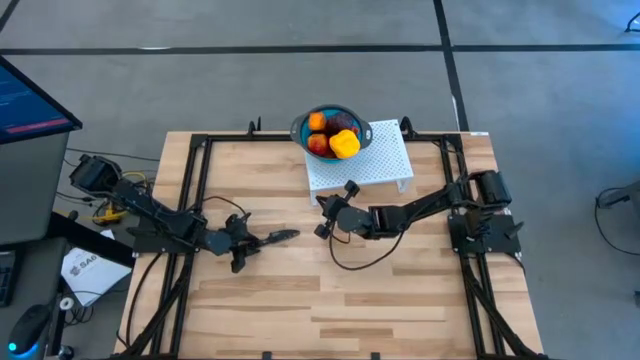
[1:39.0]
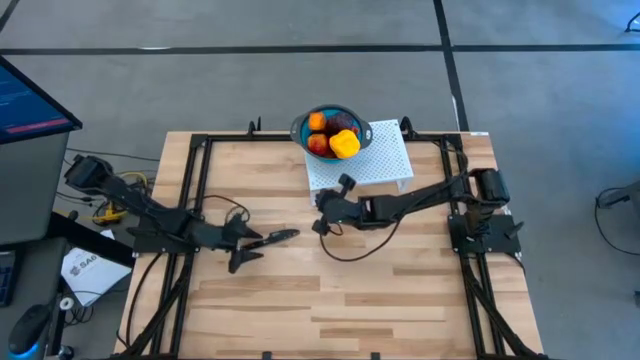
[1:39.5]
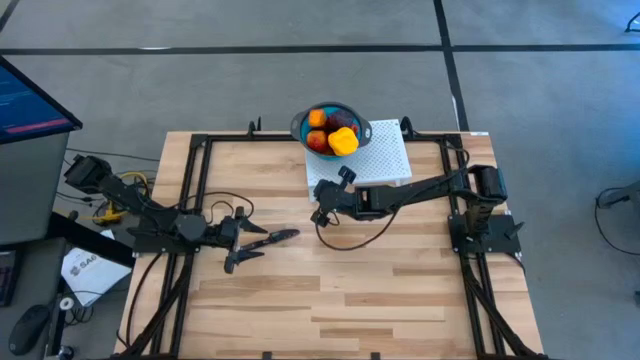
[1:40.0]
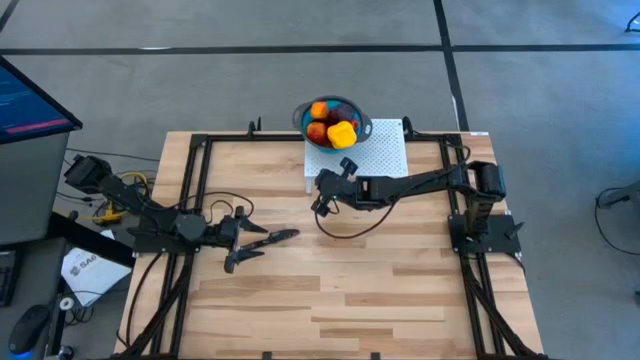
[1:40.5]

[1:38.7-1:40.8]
Task: Pick & Place Fruit
Adjust the shelf

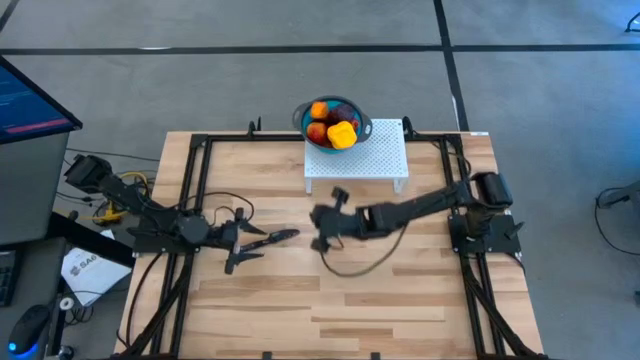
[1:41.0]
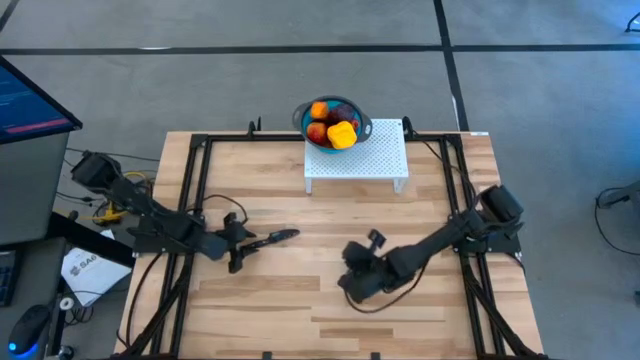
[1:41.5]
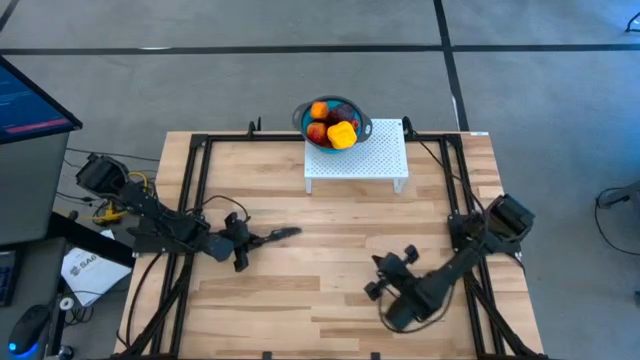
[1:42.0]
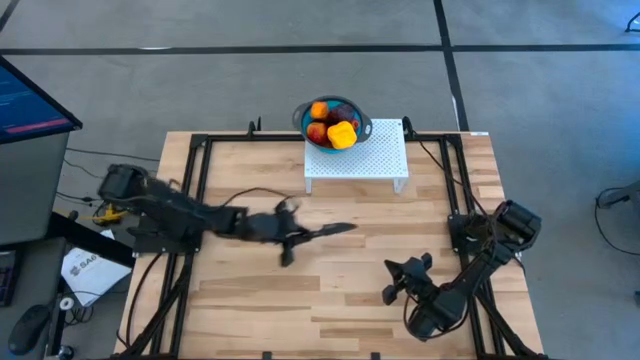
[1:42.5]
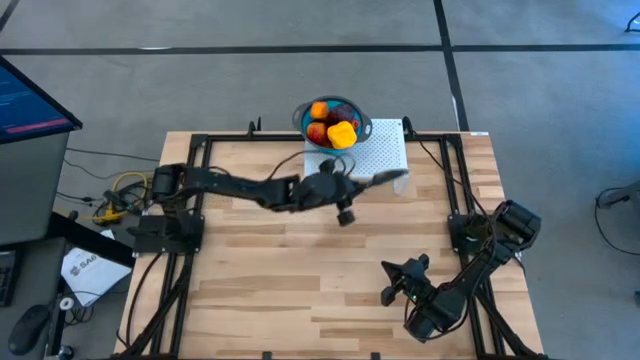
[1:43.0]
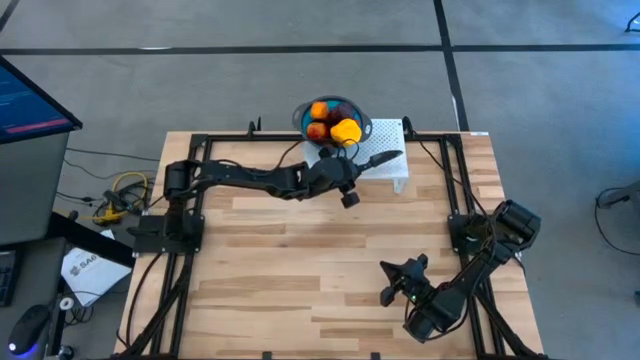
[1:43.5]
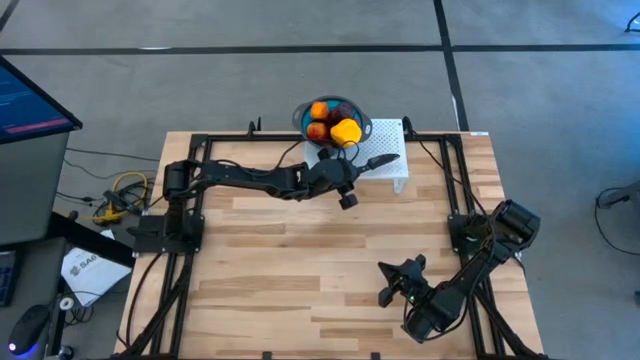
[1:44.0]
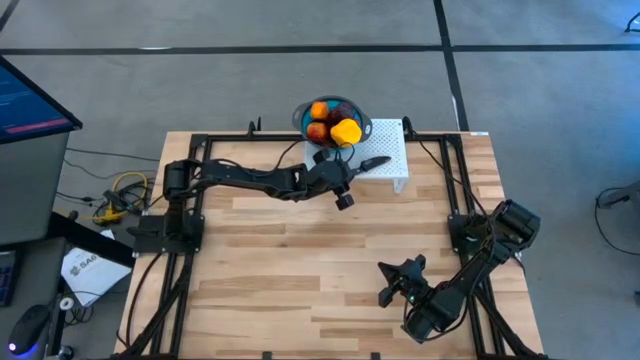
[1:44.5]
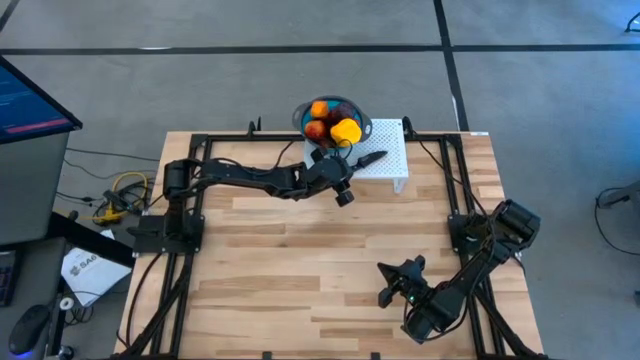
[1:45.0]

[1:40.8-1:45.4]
Put the black knife on the shelf

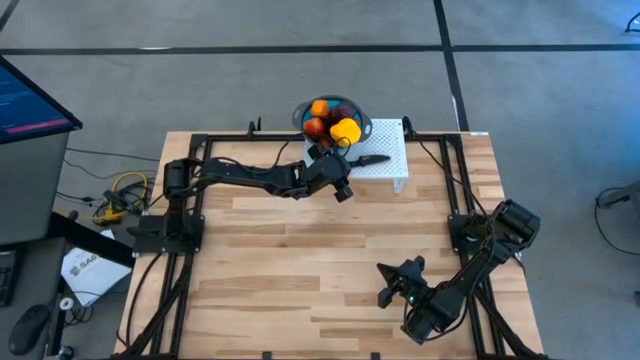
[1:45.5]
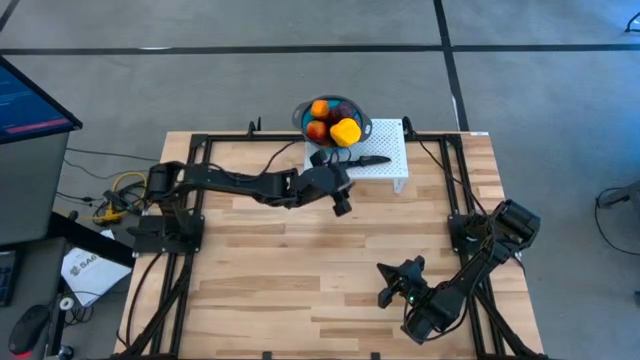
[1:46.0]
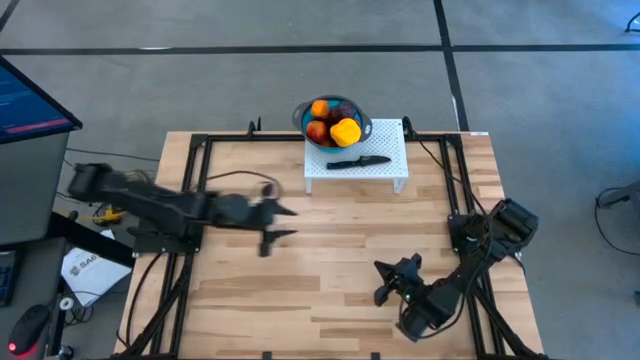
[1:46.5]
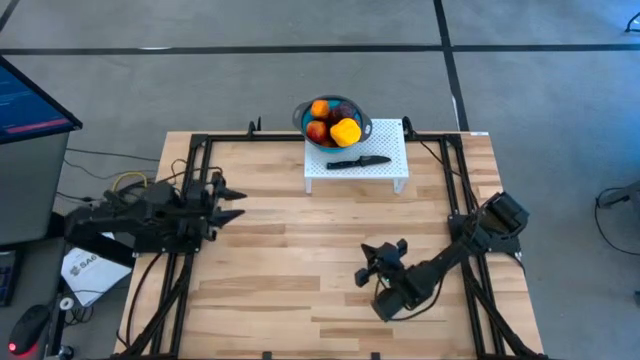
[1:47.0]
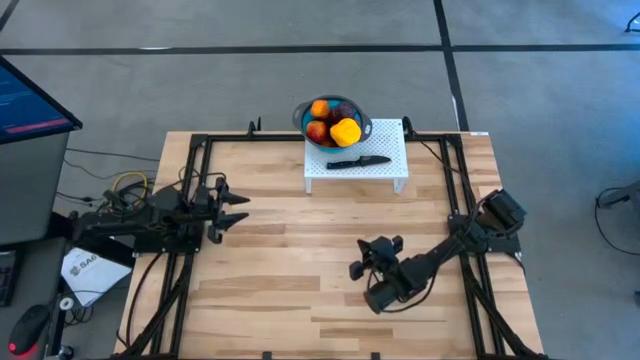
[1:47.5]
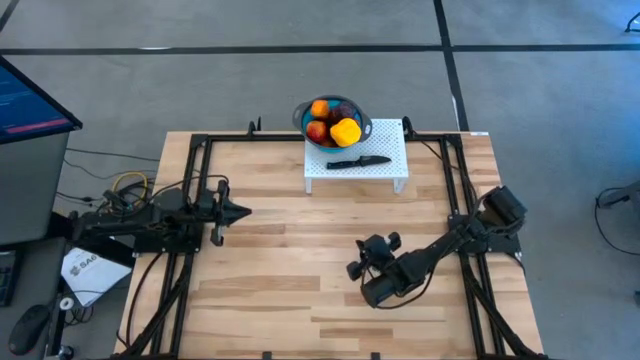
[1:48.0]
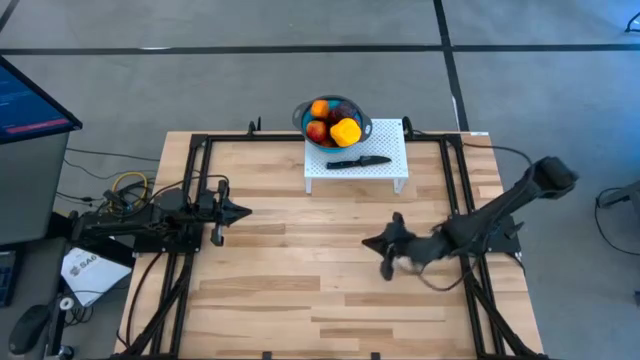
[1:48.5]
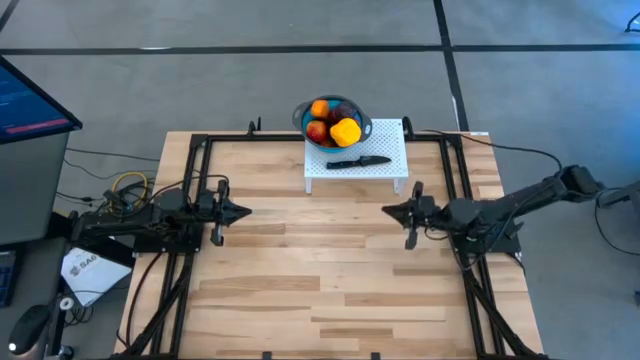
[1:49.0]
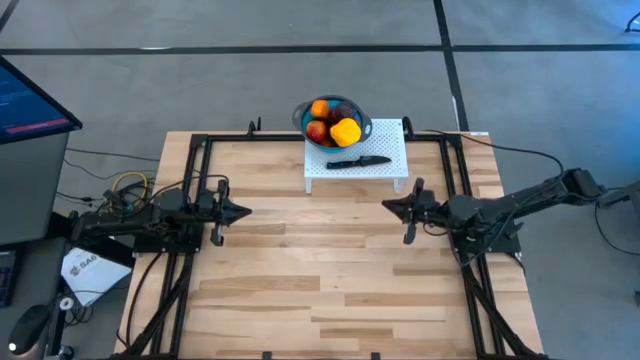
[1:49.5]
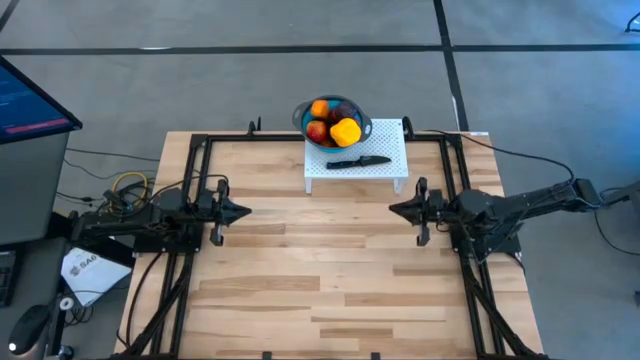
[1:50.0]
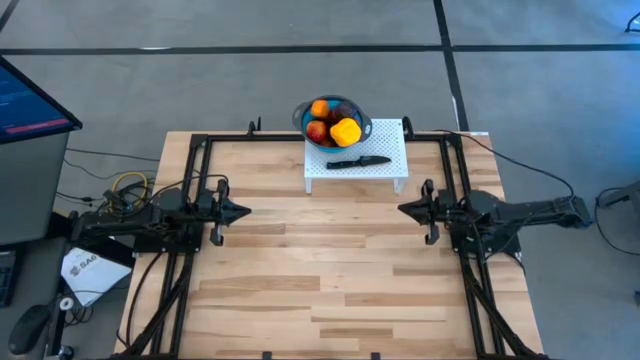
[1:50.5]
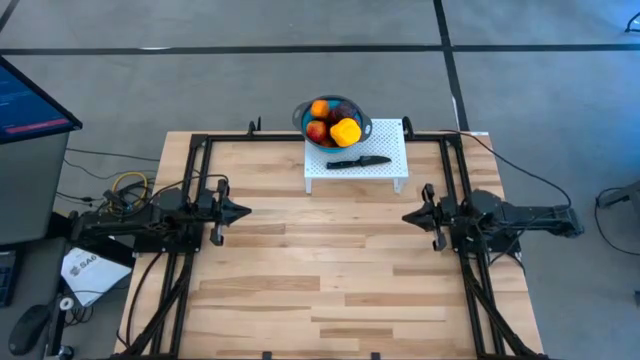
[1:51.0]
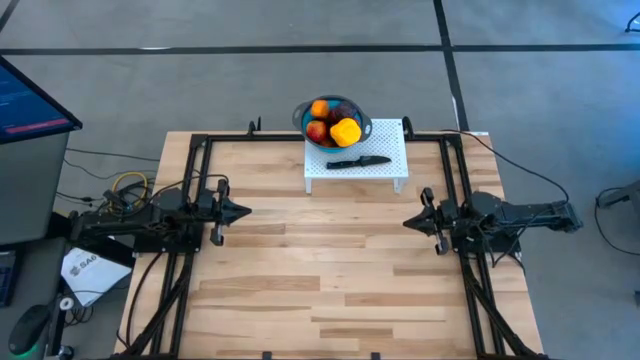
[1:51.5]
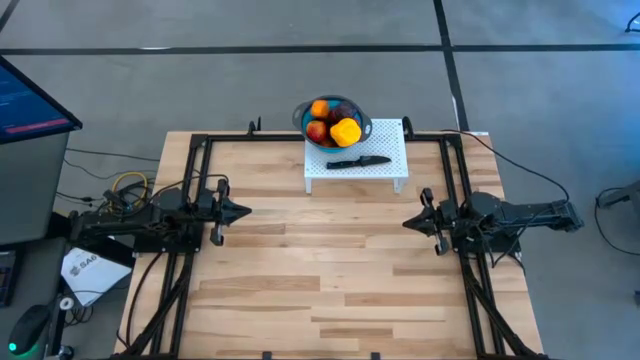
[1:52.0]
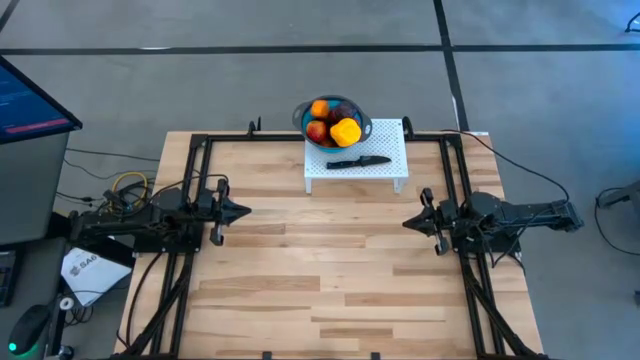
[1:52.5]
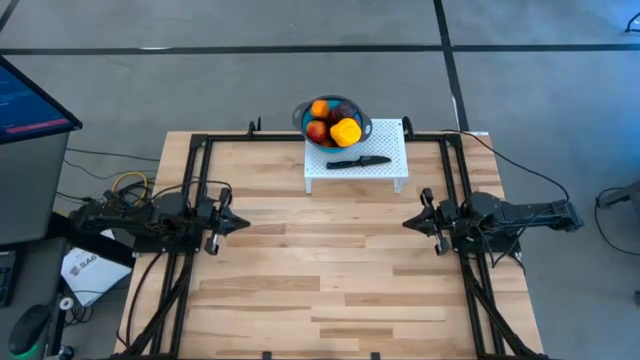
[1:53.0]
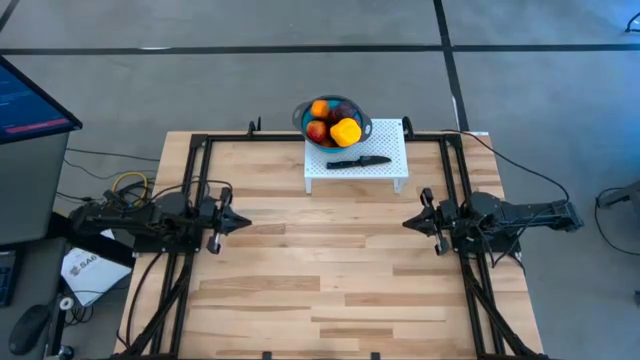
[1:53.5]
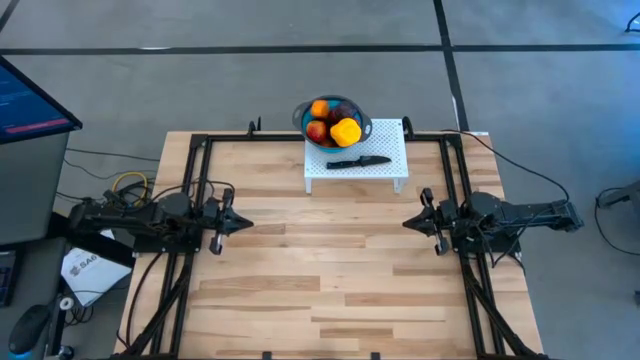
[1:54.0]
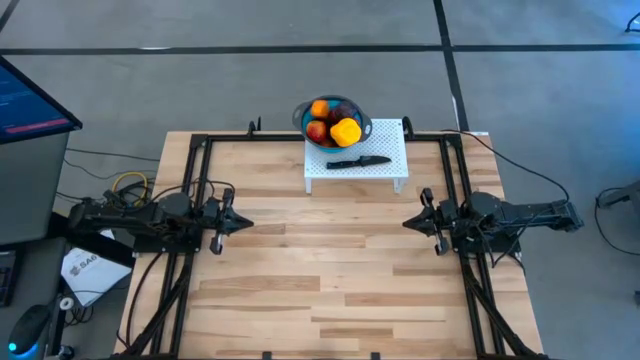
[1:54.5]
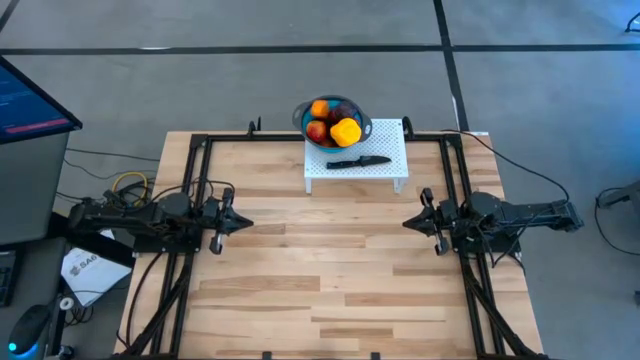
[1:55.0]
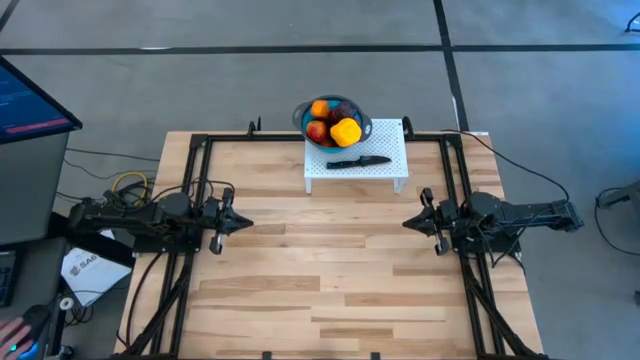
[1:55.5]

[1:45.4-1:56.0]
Return to Home Position

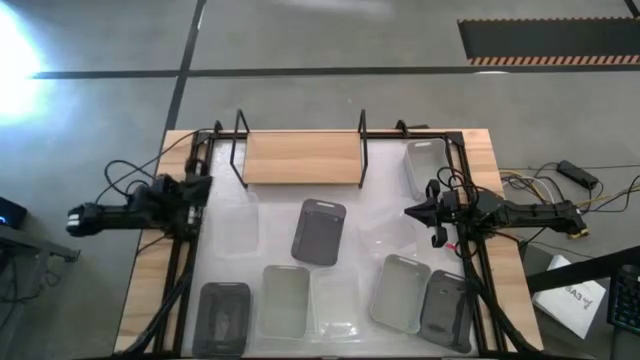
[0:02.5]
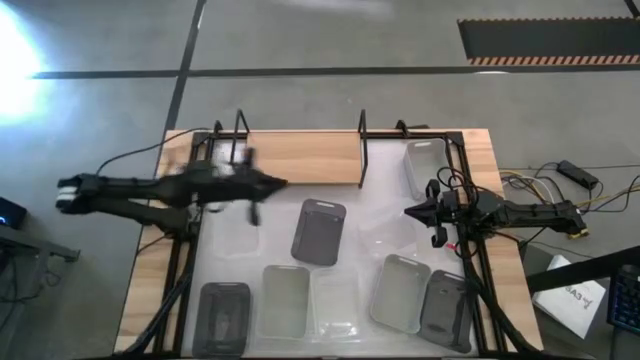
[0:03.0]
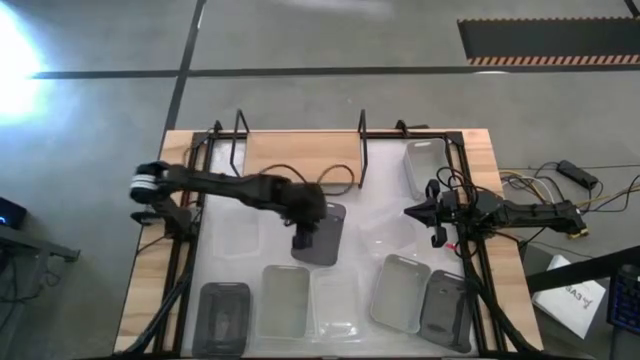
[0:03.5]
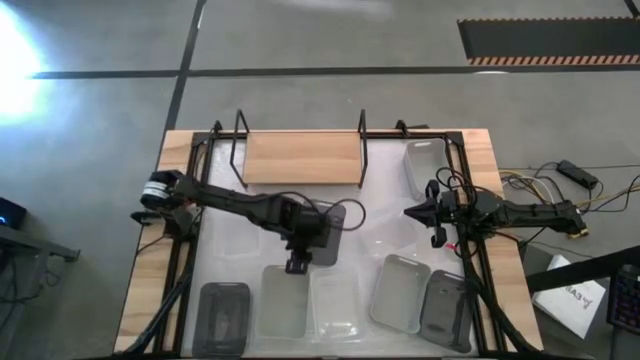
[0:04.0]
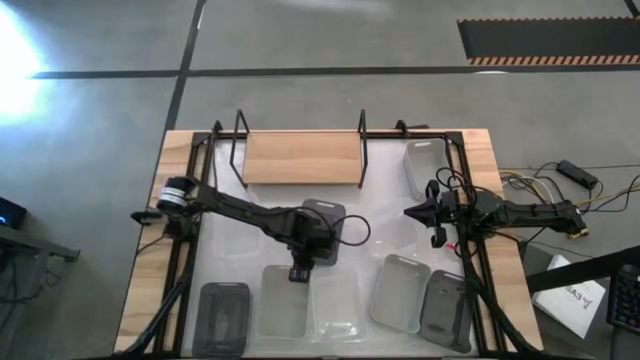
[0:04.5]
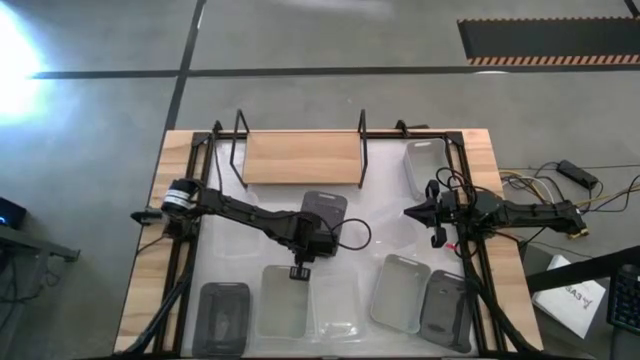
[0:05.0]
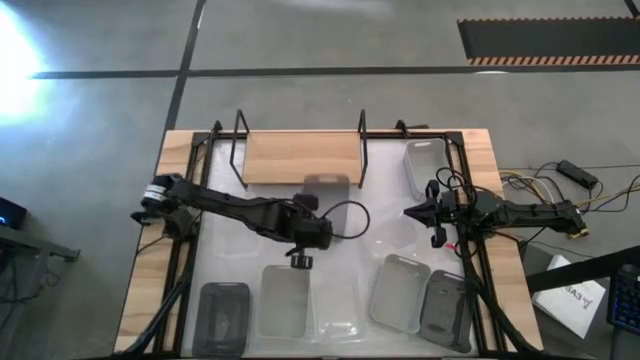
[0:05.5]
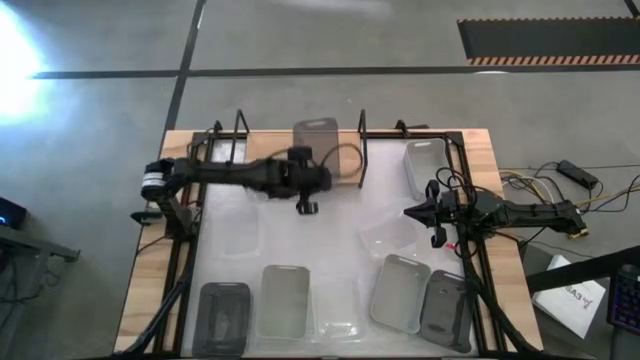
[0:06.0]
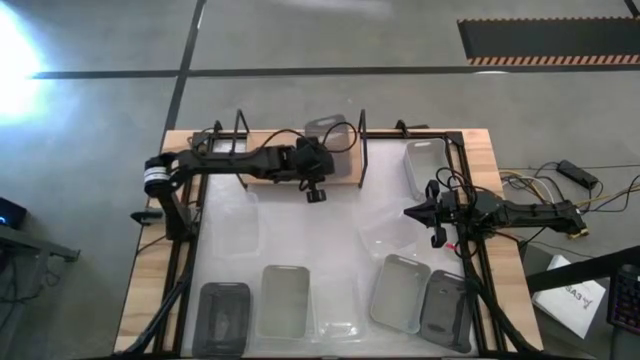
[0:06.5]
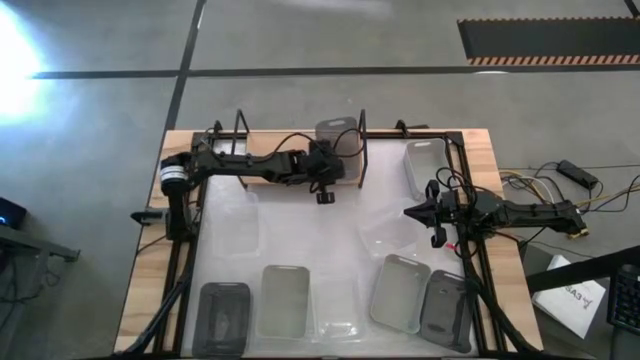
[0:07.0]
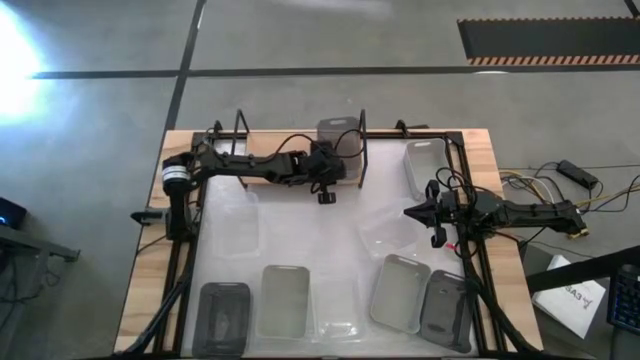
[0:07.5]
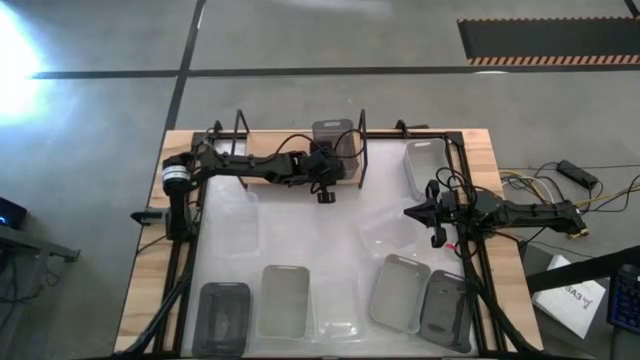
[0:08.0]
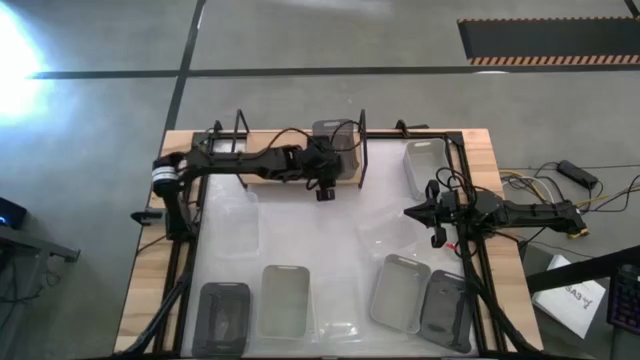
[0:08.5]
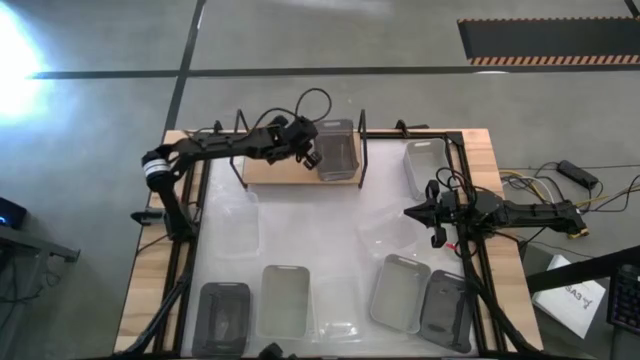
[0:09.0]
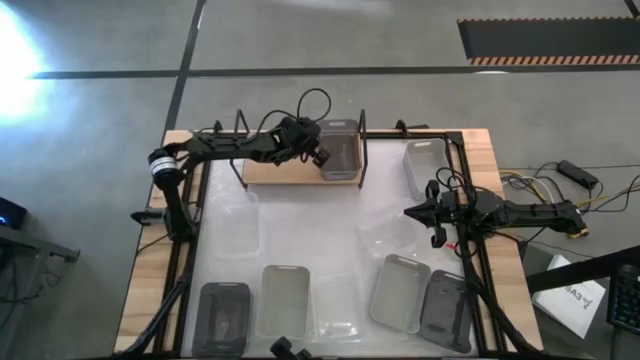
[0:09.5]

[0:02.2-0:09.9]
Task: Stack baskets on shelf by color
Put the top black bin on the shelf
